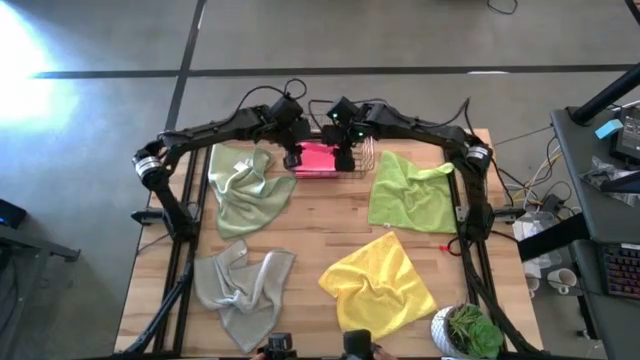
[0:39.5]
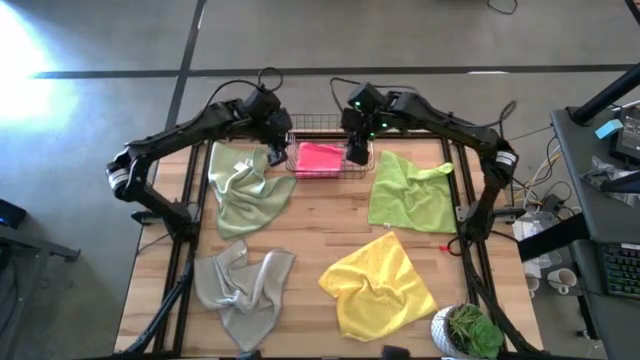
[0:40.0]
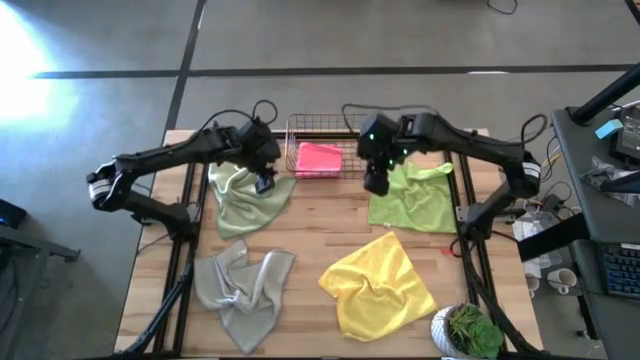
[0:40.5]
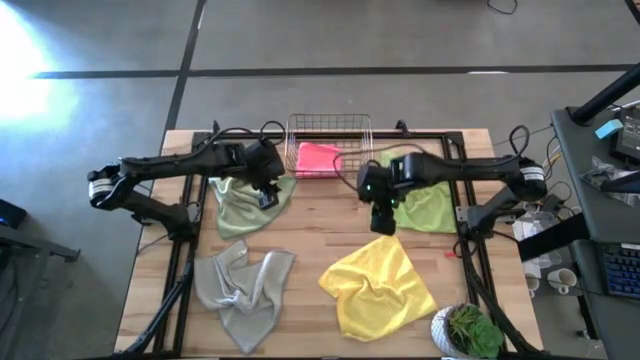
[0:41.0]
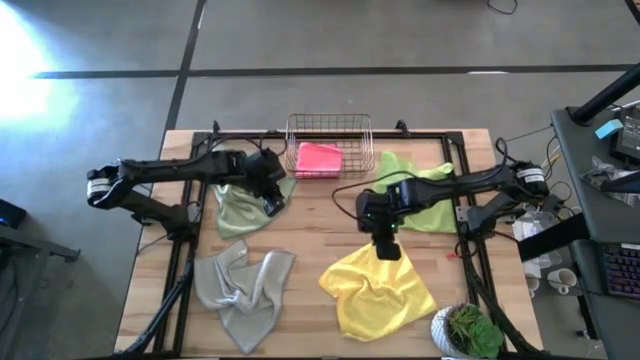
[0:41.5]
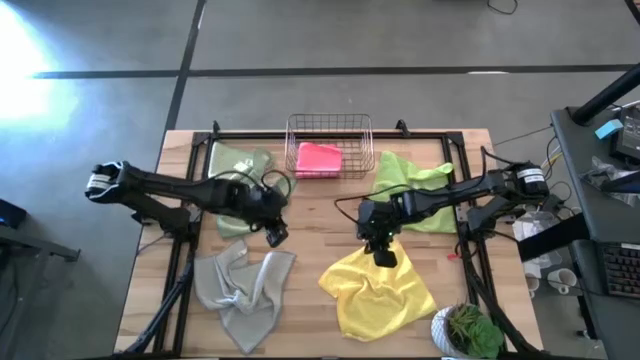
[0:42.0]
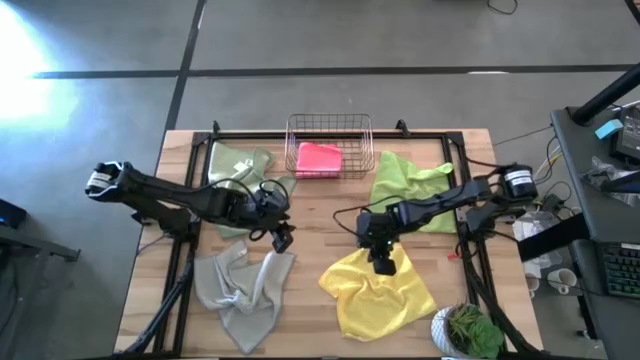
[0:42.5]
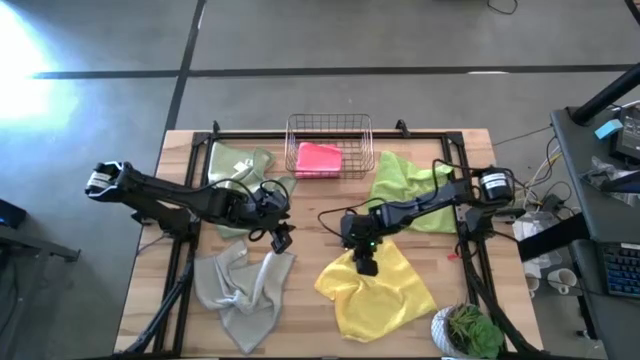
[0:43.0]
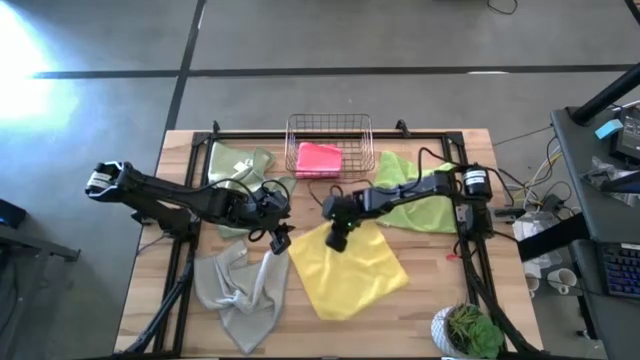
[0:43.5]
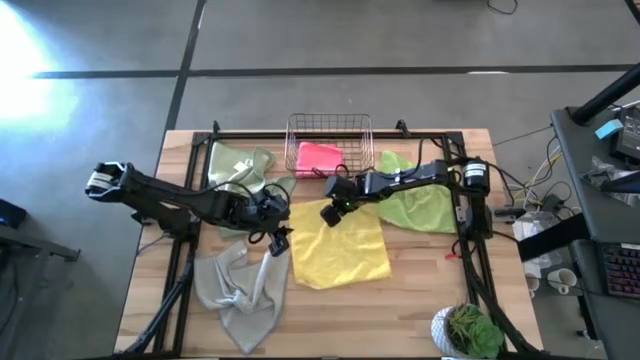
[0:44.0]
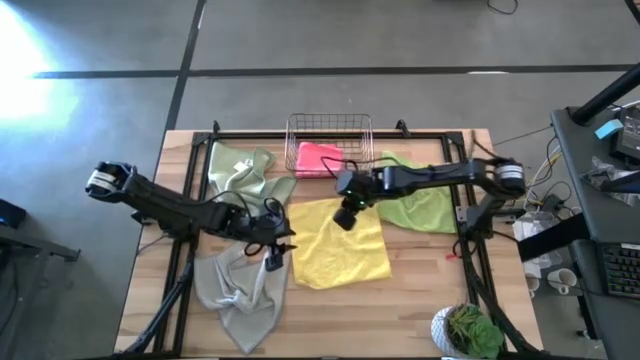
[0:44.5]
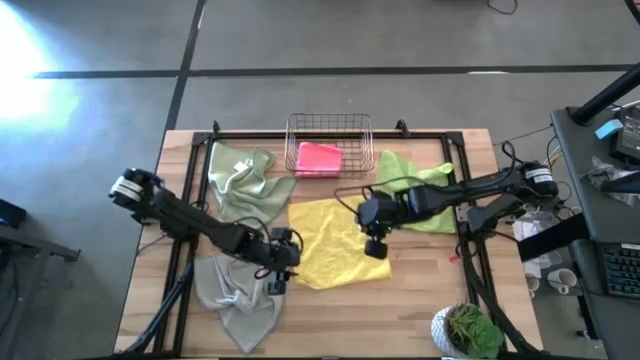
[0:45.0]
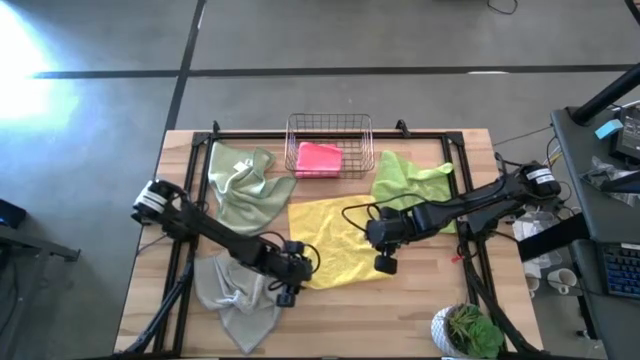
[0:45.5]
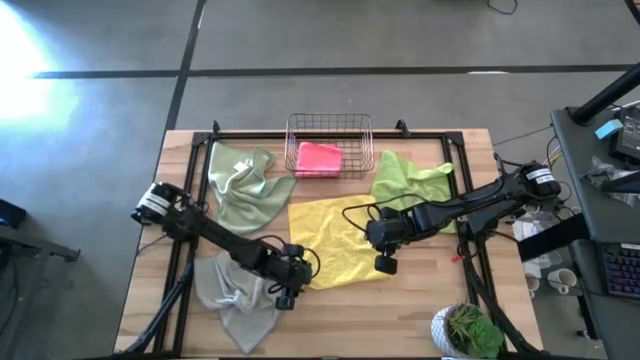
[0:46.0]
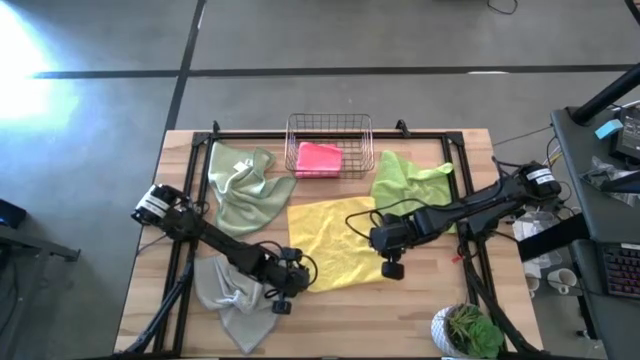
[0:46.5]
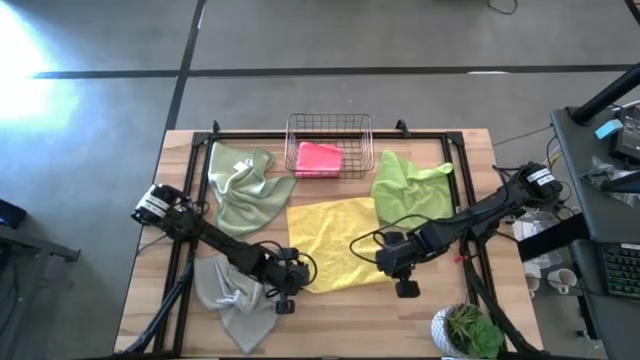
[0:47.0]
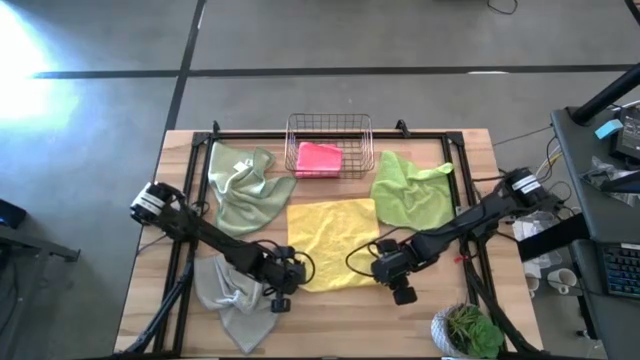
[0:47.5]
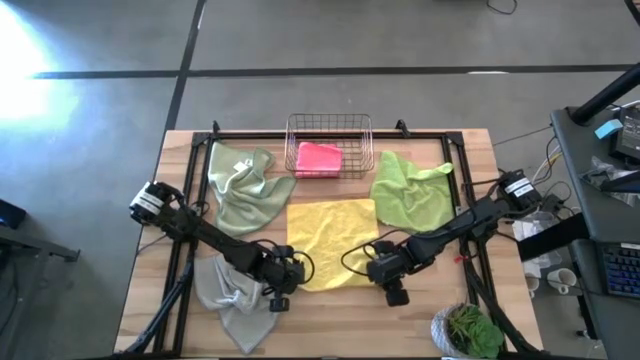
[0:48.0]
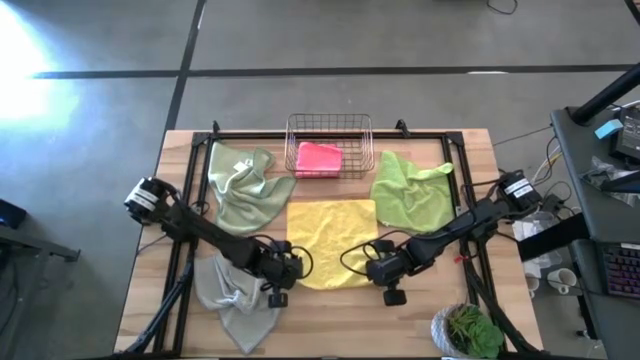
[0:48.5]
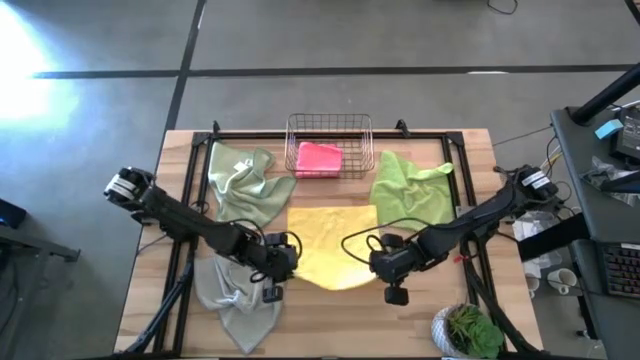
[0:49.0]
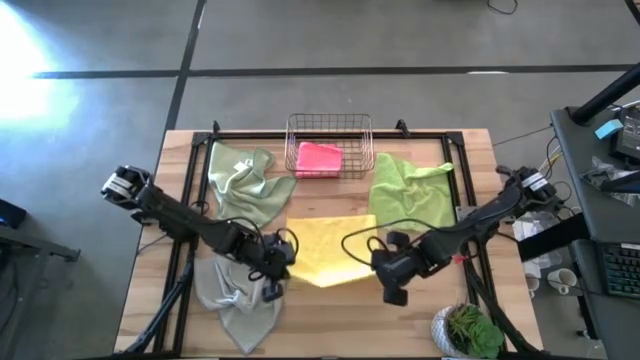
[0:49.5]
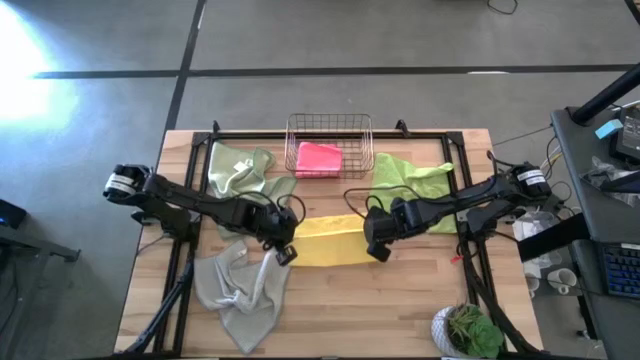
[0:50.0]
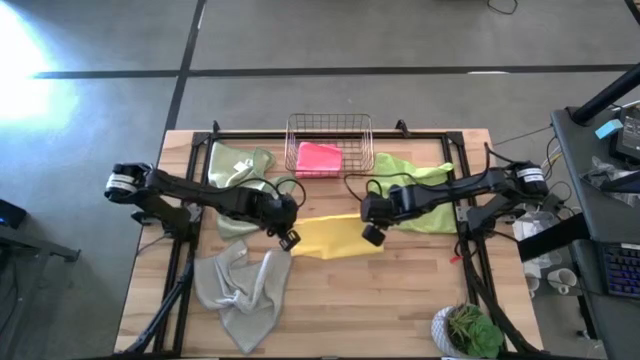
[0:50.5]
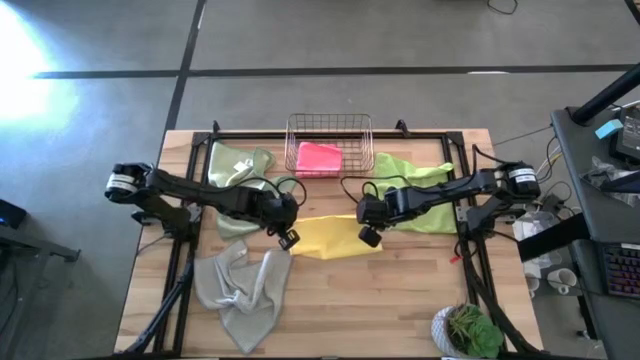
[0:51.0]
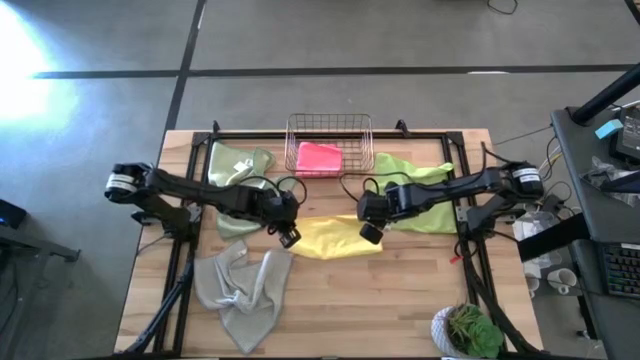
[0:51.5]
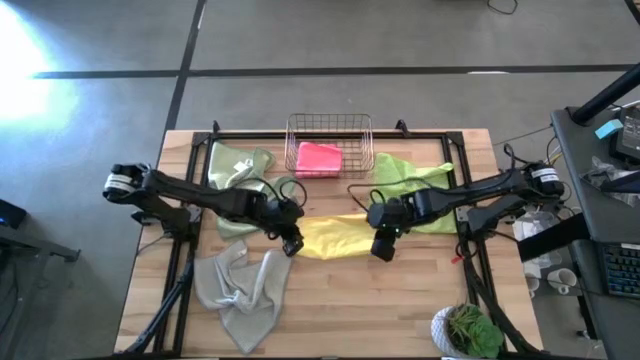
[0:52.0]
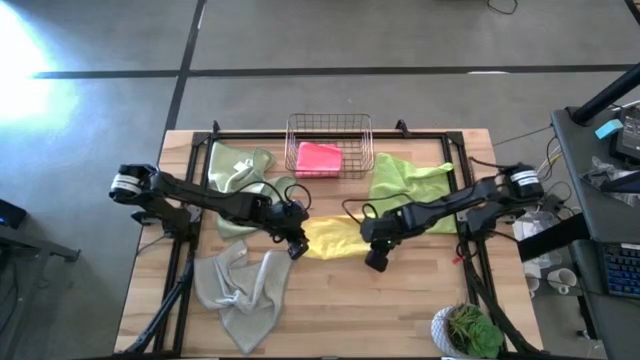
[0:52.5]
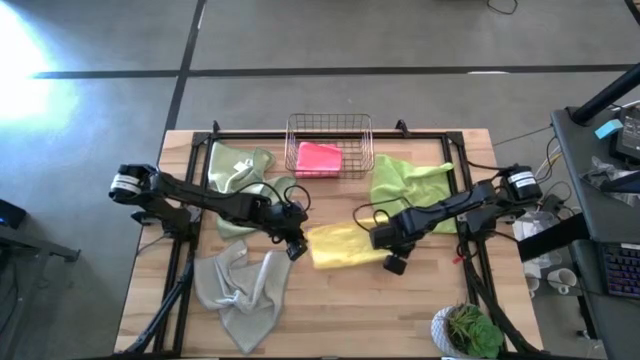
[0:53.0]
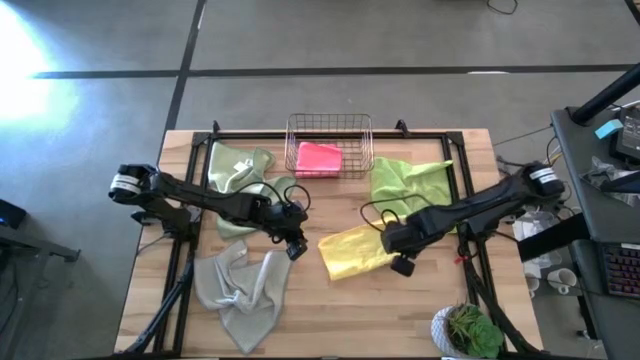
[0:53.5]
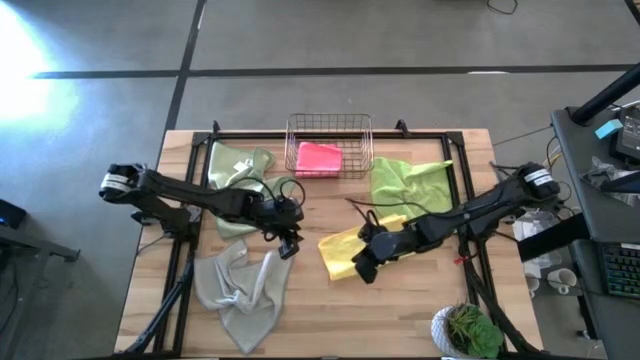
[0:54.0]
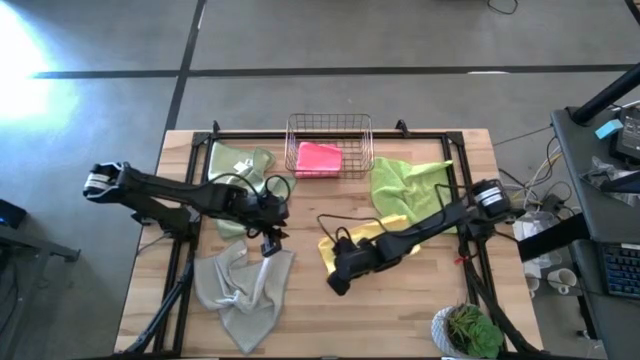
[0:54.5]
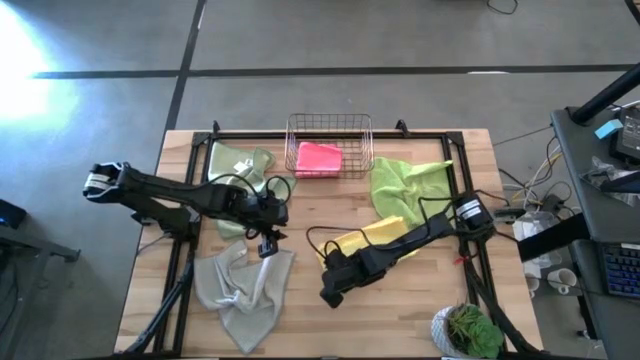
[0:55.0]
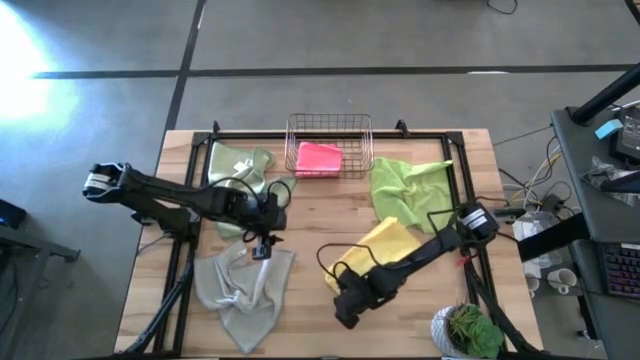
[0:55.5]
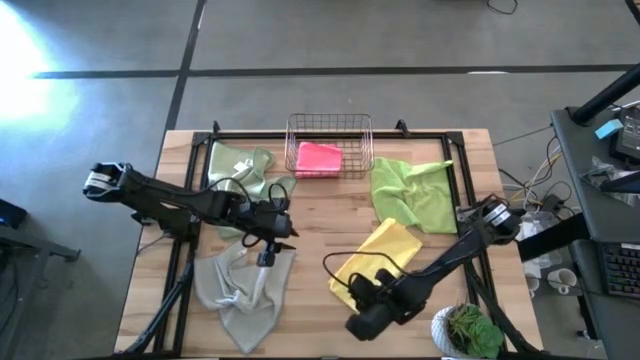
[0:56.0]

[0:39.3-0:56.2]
Task: Fold microfiber towels
Fold the yellow microfiber cloth

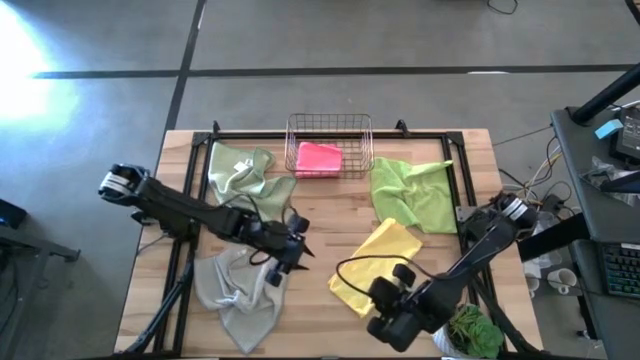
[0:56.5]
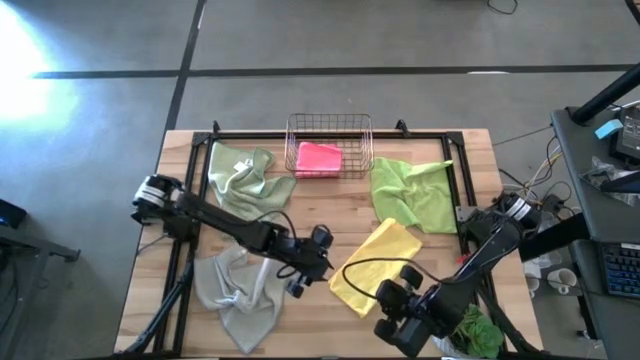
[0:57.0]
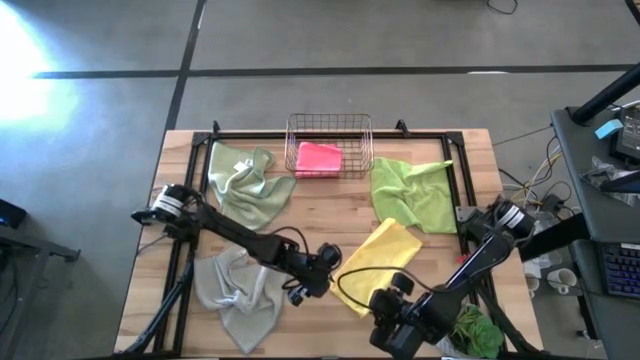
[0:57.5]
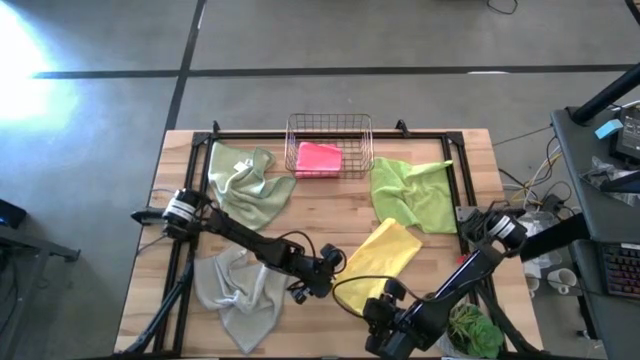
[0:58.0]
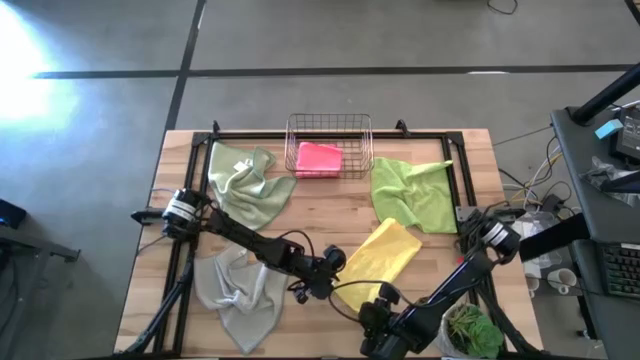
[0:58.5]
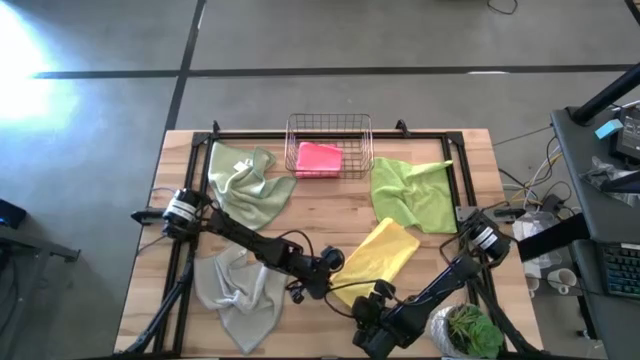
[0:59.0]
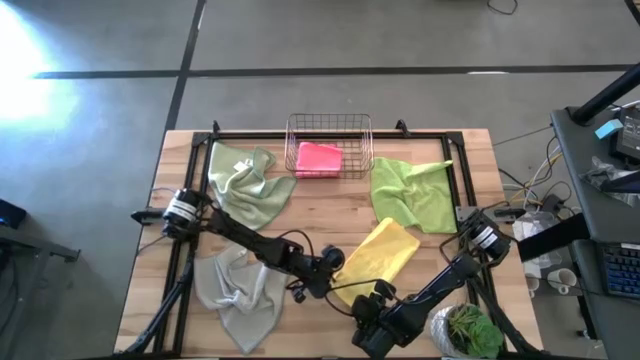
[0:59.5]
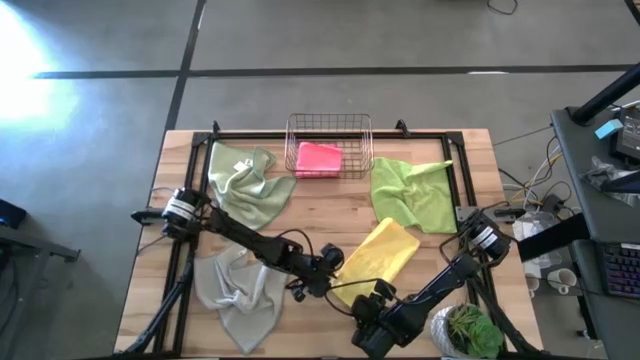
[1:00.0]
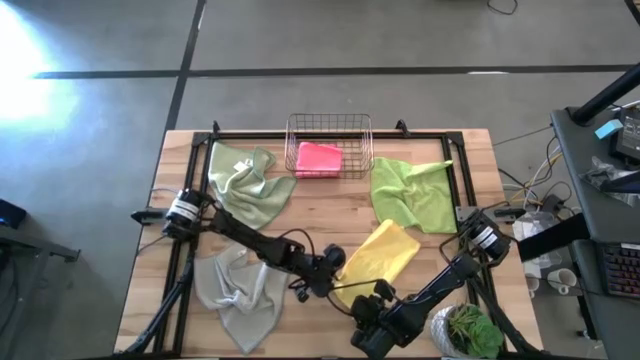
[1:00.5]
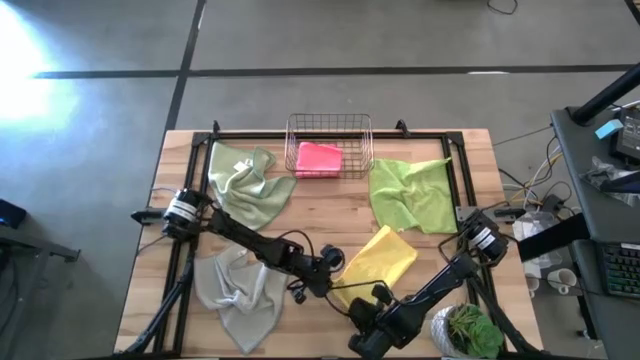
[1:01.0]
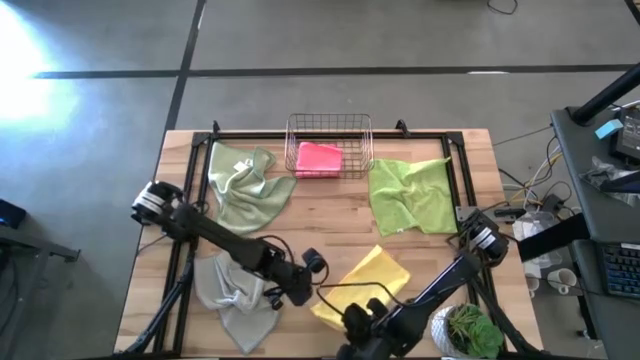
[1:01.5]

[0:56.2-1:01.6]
Fold the yellow microfiber cloth
